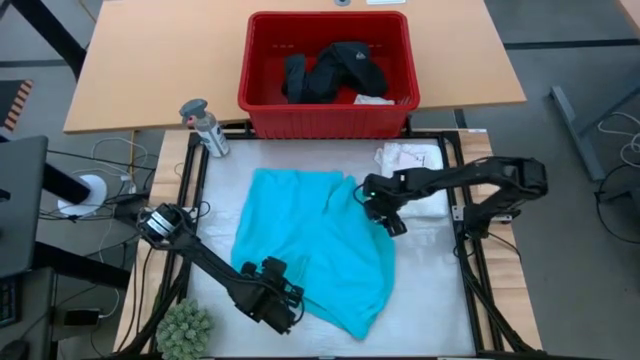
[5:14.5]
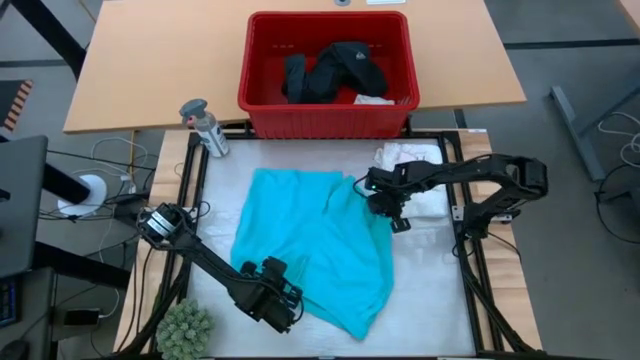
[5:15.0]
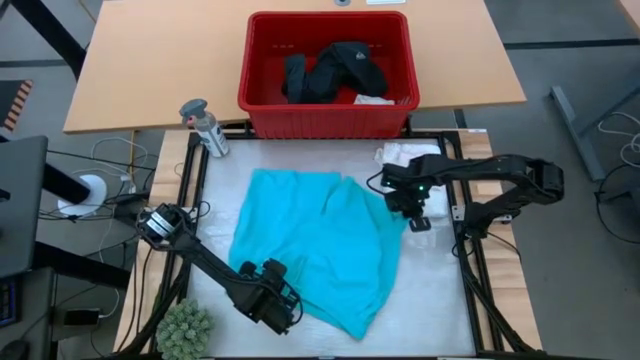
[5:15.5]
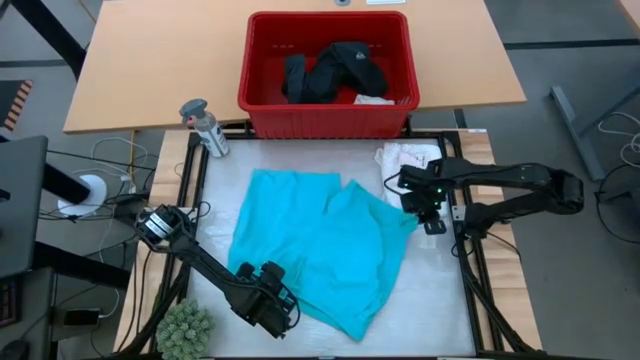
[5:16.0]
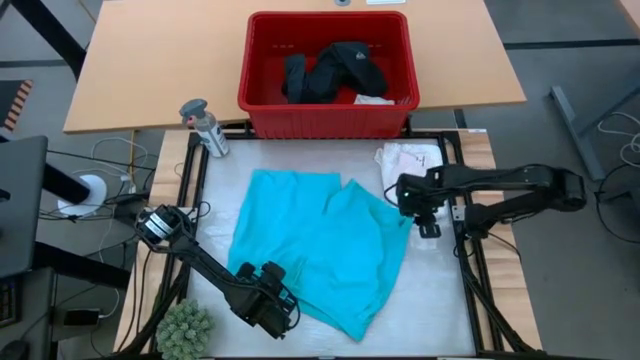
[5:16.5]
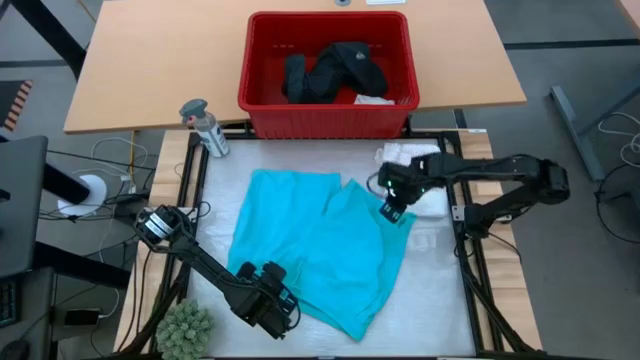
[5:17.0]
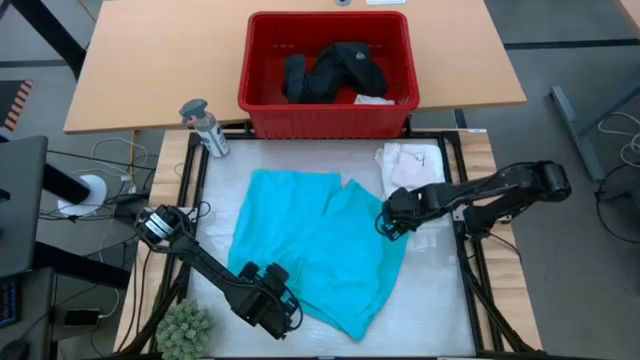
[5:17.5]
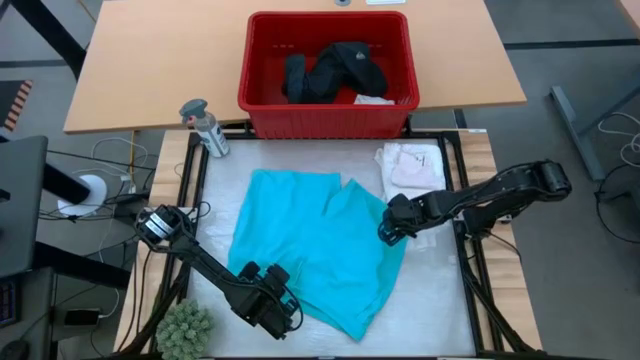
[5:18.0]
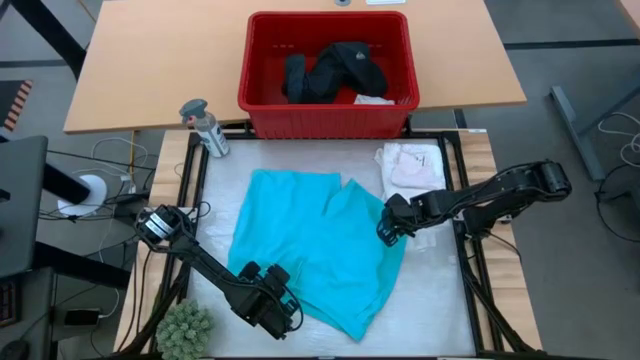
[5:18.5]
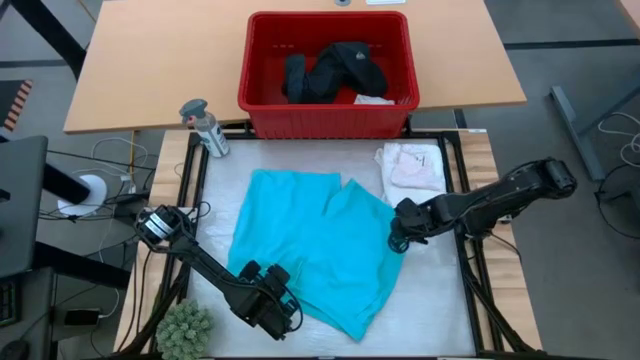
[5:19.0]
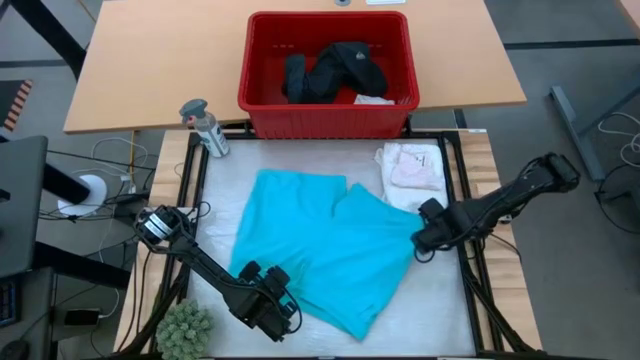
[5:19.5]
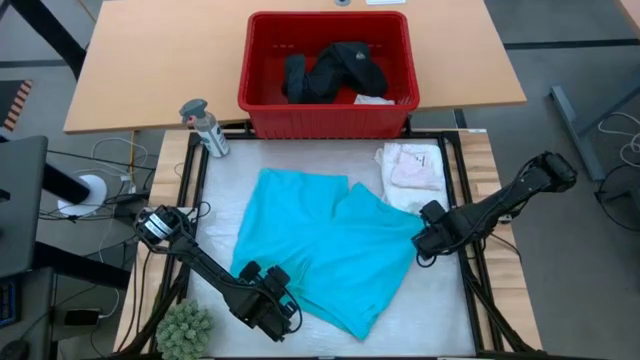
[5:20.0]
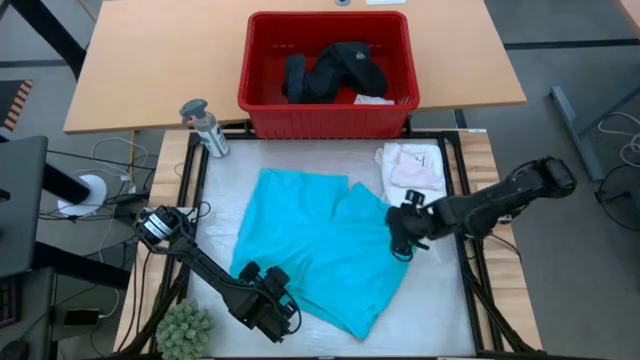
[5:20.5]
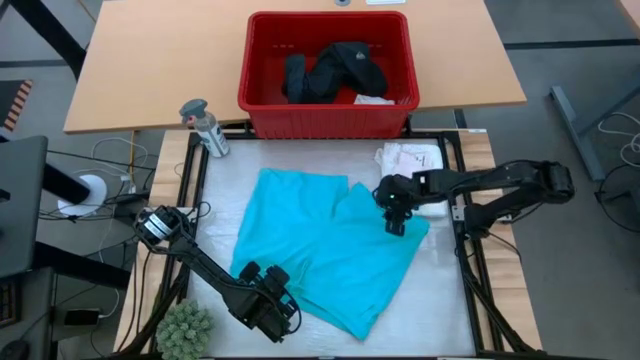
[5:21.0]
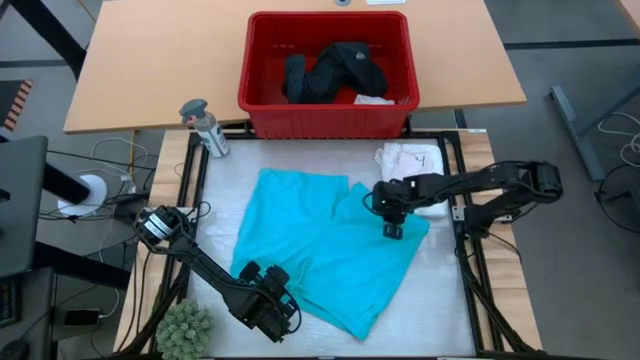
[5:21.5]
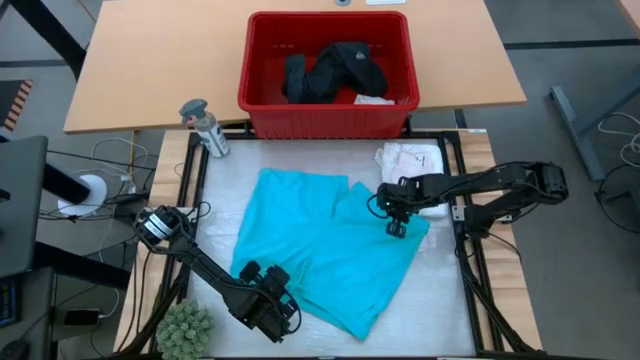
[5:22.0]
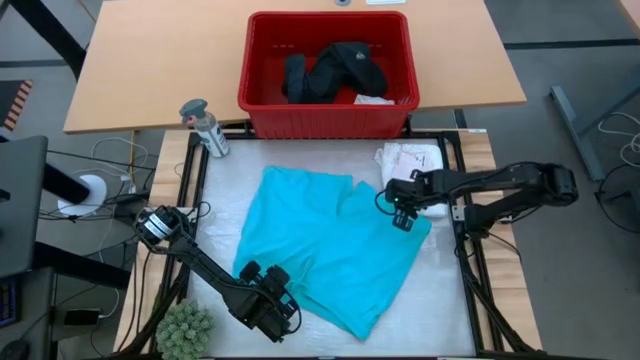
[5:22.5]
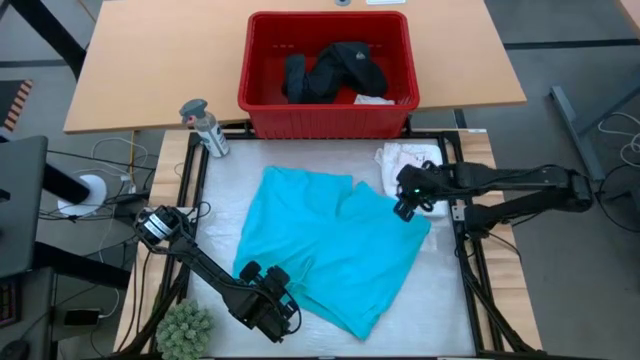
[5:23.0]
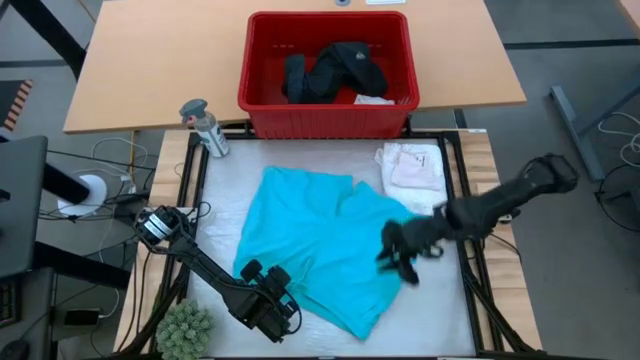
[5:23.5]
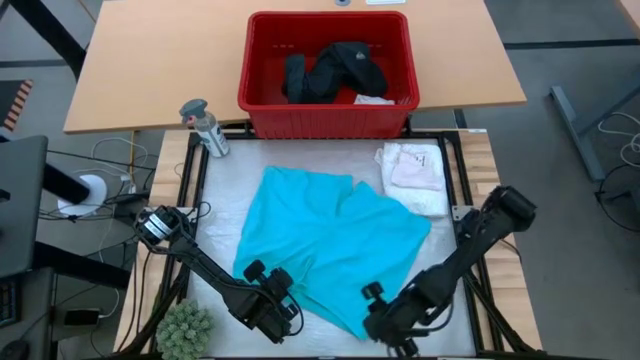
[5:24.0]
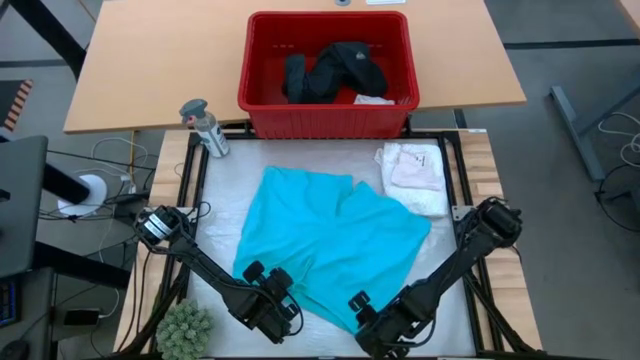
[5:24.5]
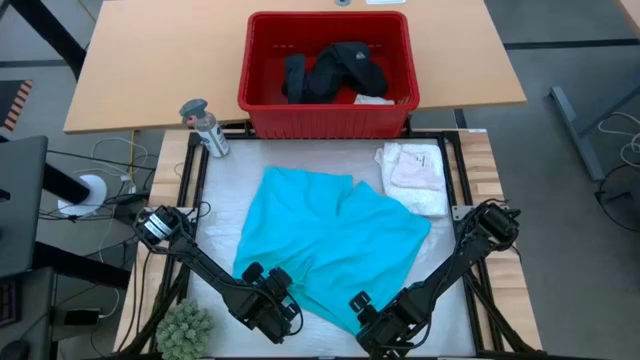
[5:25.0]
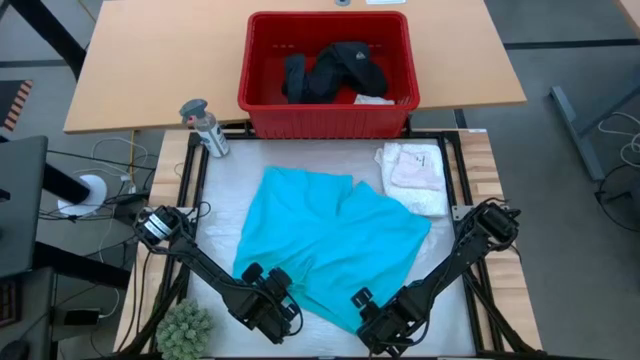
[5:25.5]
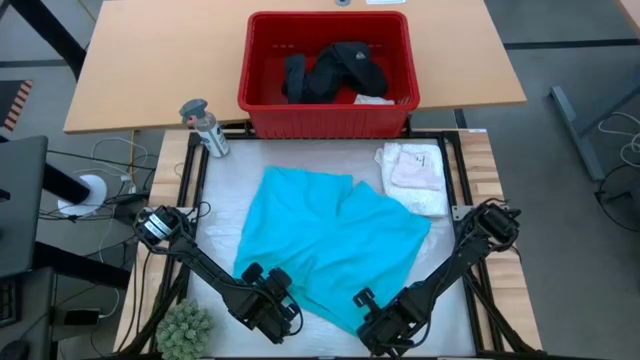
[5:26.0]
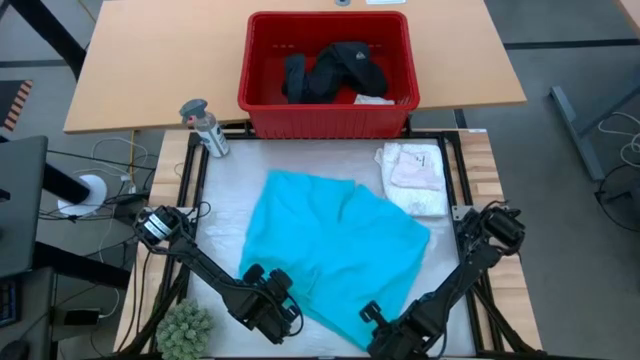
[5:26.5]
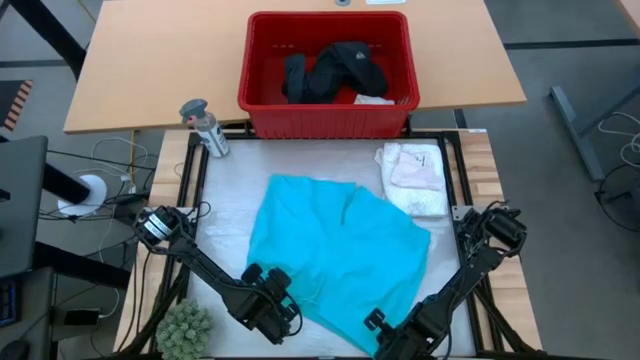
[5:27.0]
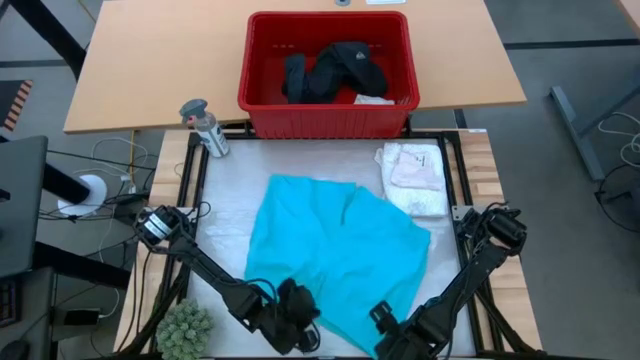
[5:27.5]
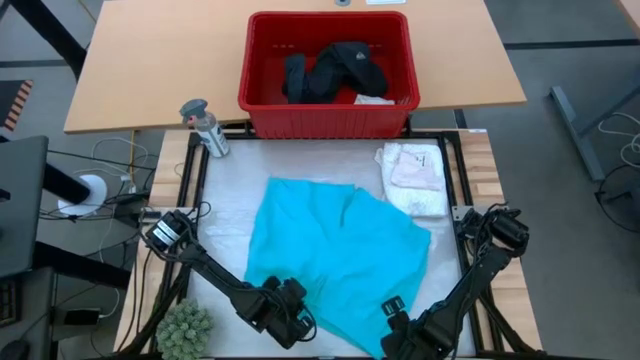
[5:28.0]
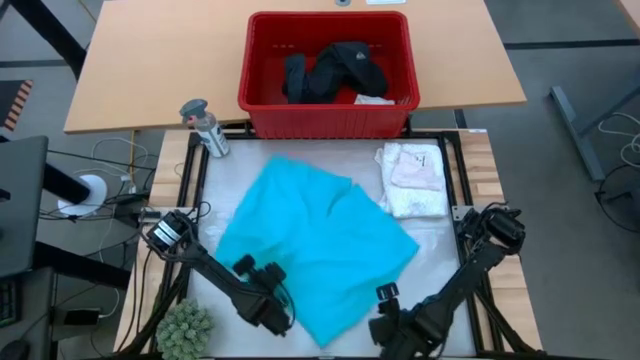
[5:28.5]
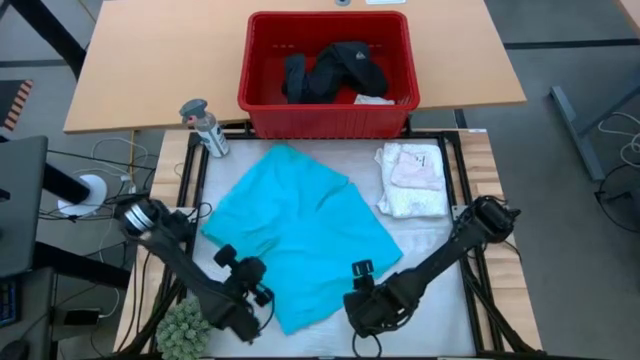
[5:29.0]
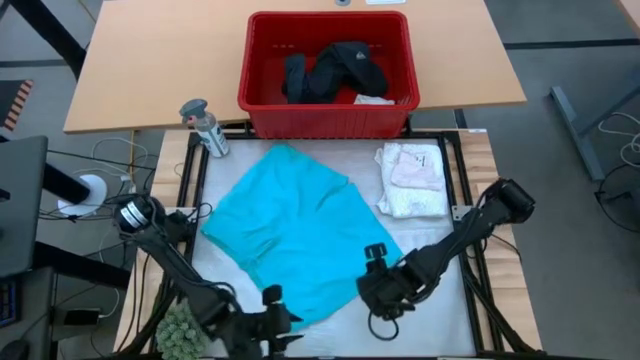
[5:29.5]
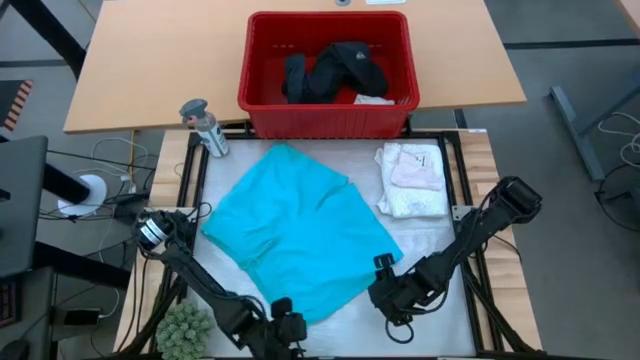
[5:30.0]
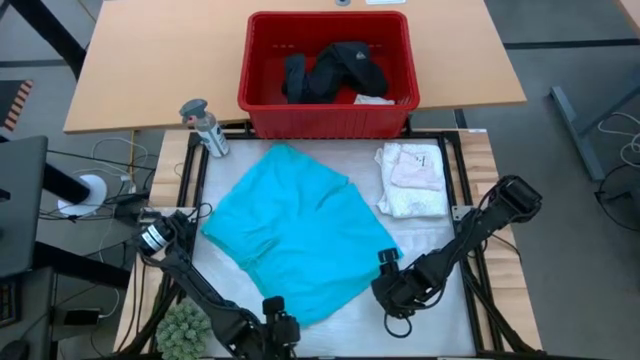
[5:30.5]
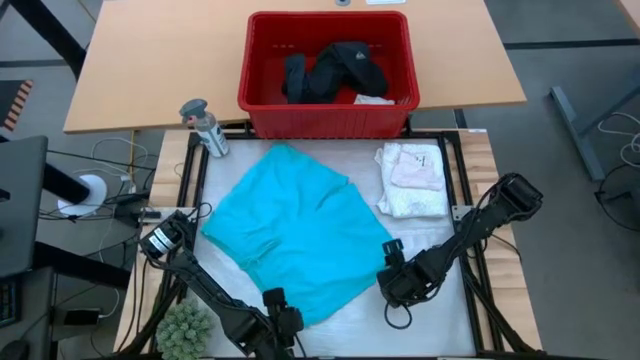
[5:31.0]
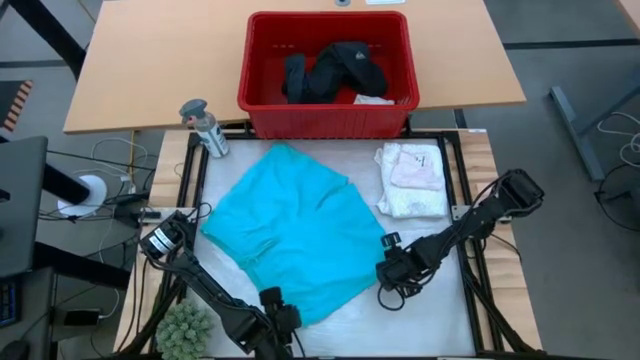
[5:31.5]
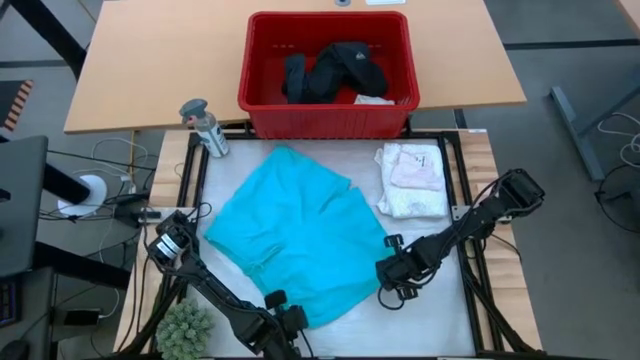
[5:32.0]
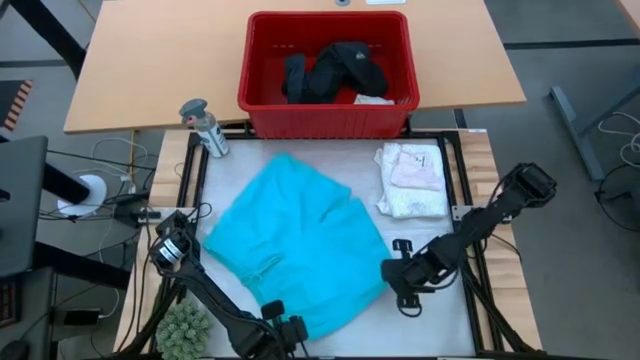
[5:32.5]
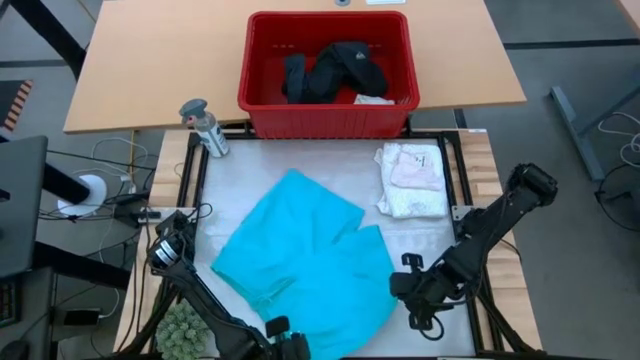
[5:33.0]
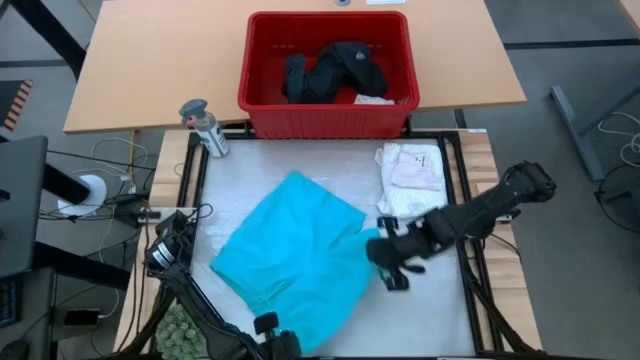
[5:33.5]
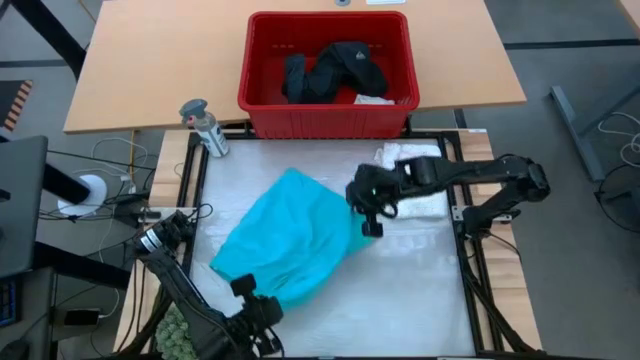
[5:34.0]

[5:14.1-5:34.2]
Task: Fold Laundry from Bin
Fold the light blue shorts
